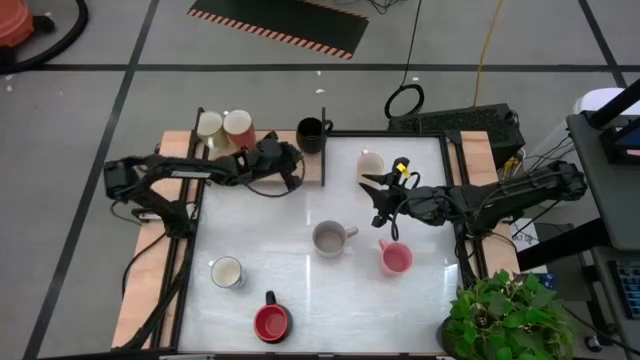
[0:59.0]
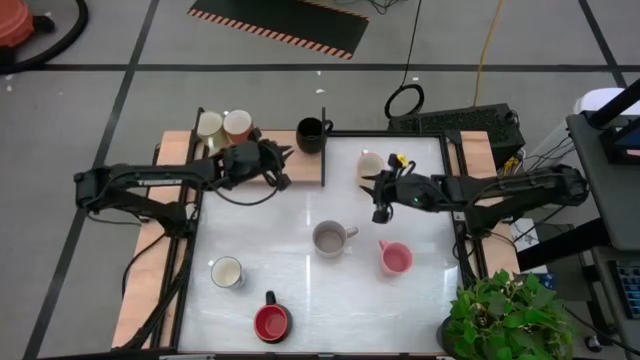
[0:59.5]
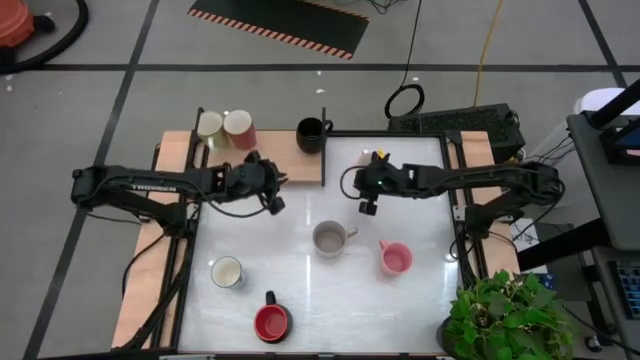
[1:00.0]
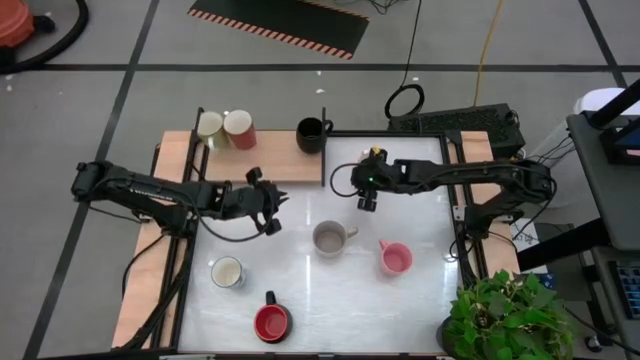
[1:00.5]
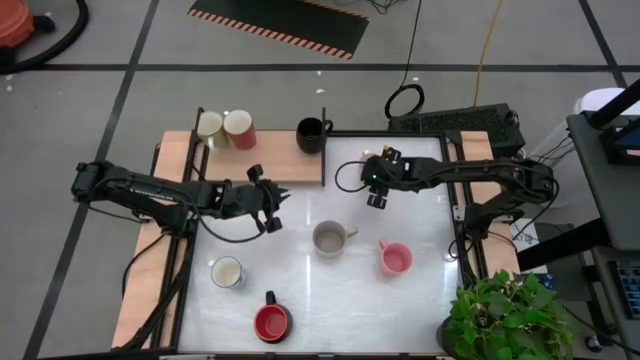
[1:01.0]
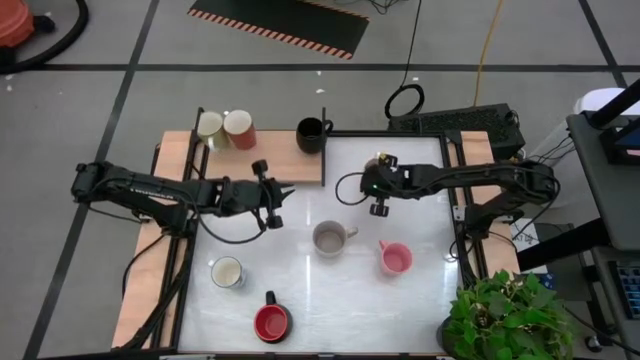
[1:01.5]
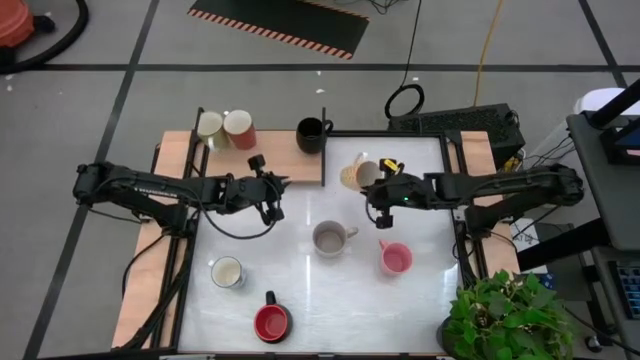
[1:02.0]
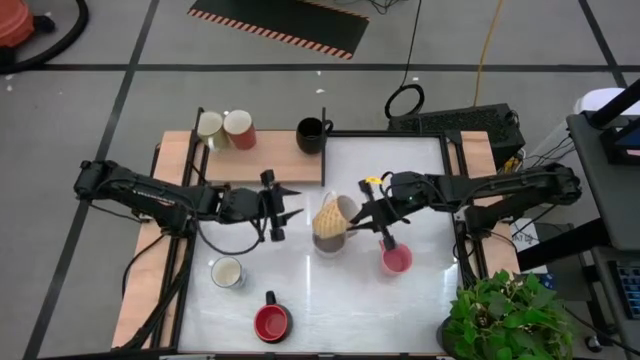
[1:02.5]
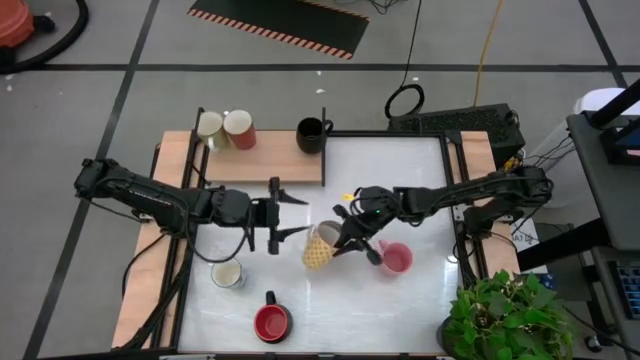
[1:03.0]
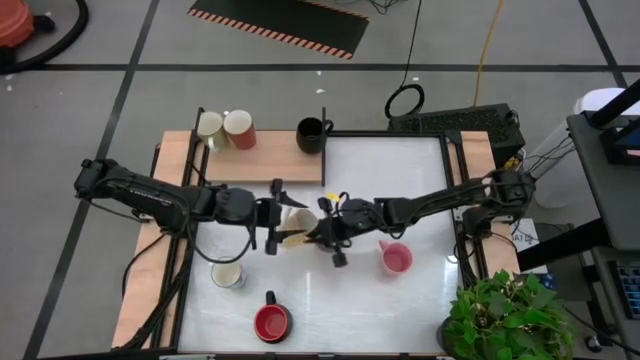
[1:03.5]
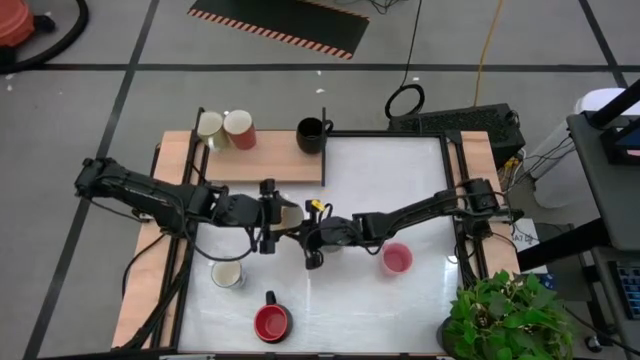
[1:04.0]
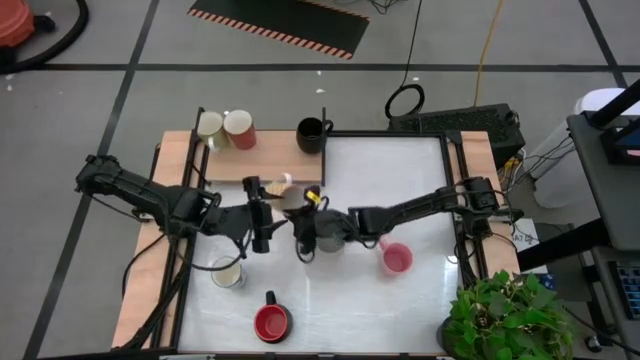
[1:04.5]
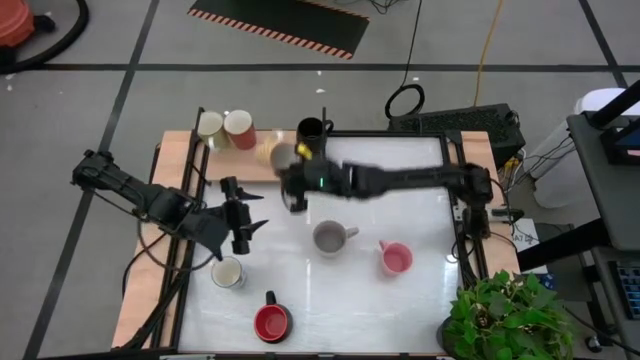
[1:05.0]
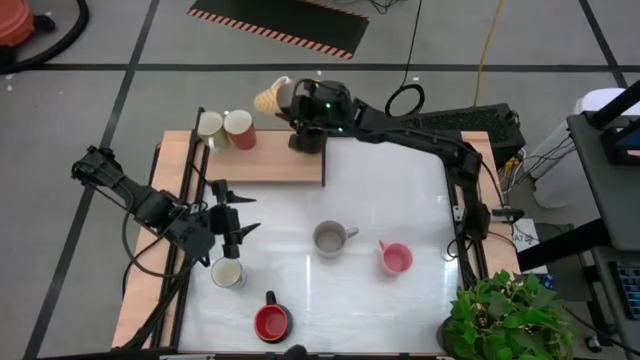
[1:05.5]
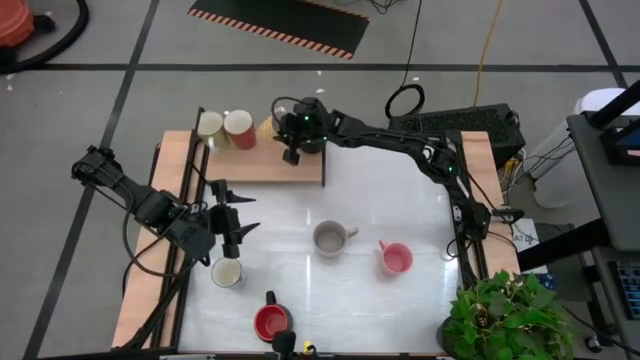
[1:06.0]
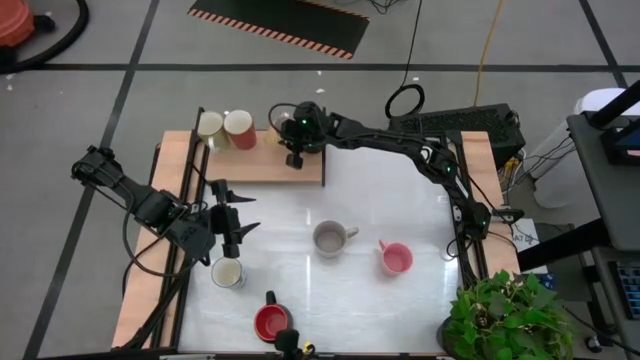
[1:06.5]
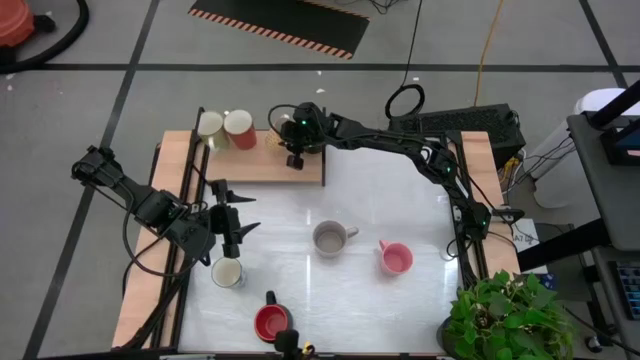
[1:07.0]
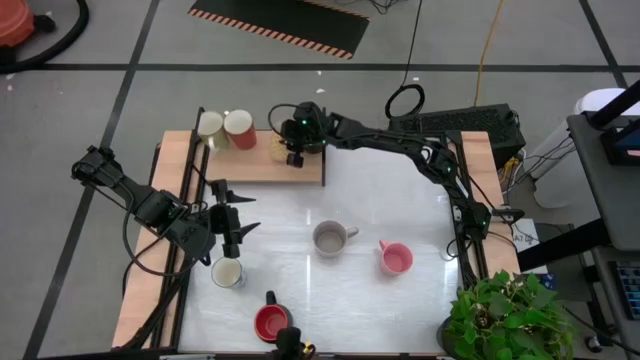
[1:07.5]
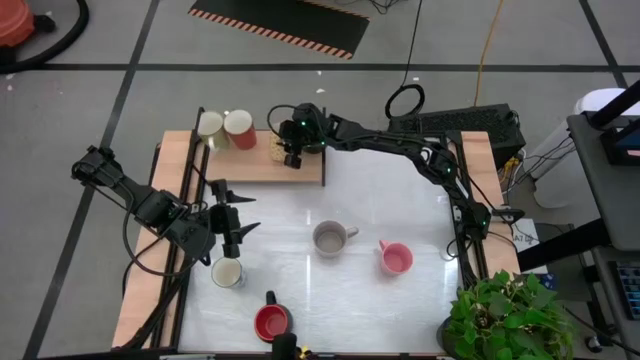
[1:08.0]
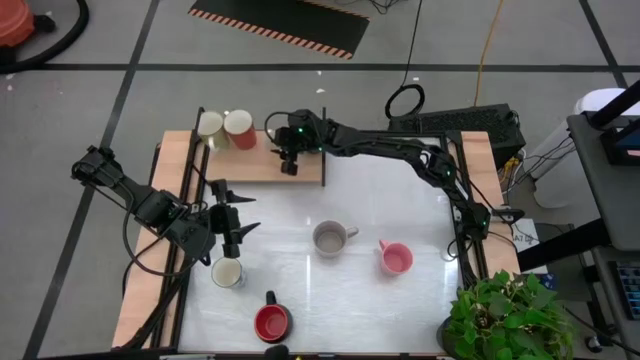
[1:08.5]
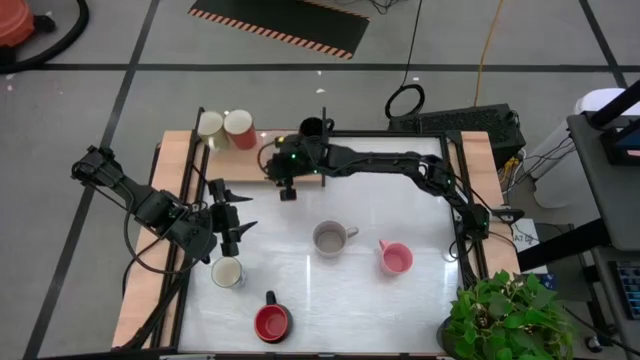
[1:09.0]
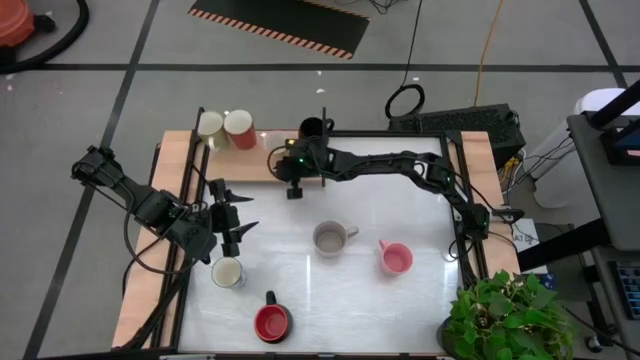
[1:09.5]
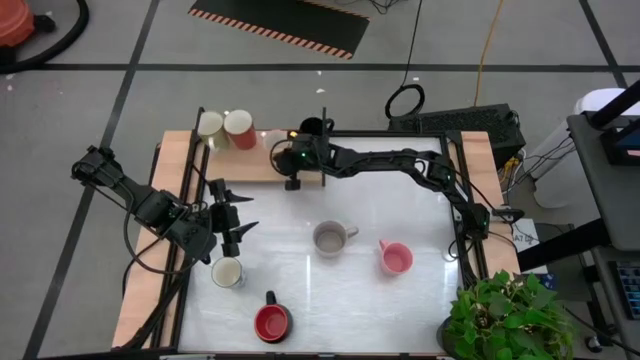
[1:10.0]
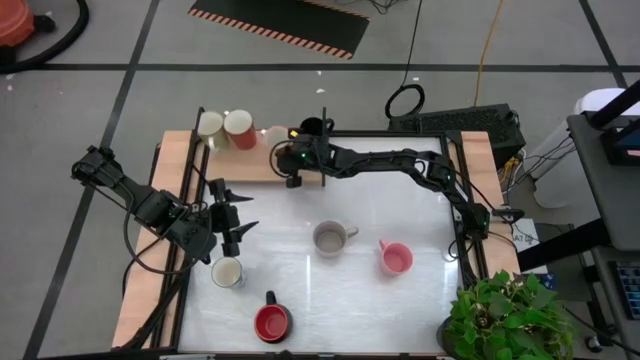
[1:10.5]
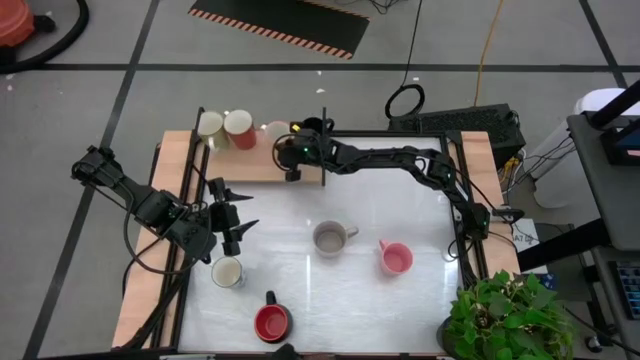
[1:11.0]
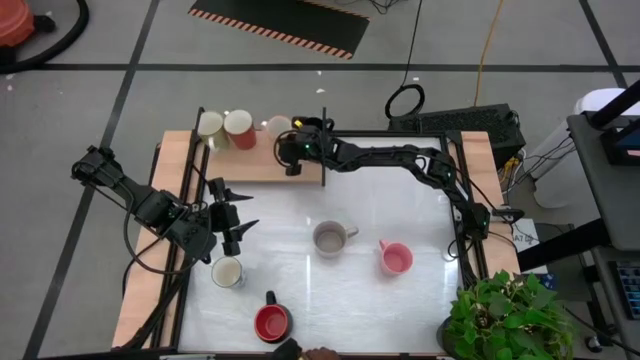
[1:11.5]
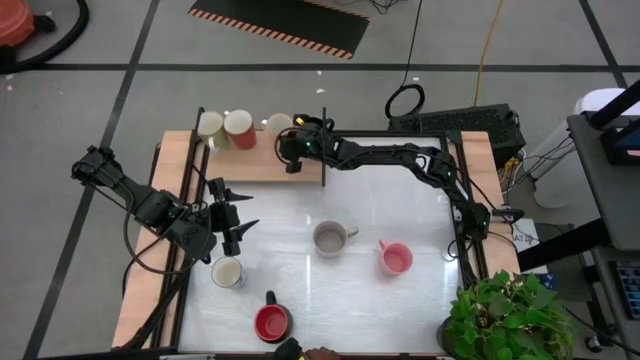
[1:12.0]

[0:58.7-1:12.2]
Task: Place coffee mugs
Put the yellow patterned mug on the shelf

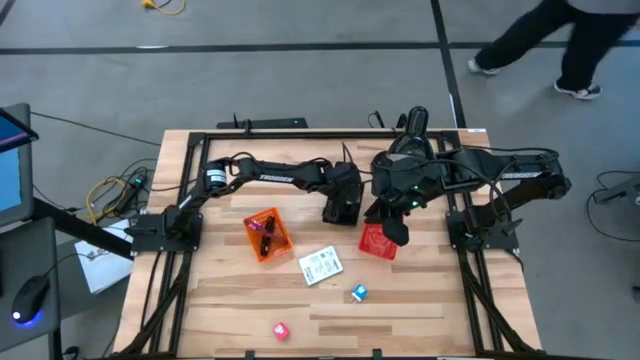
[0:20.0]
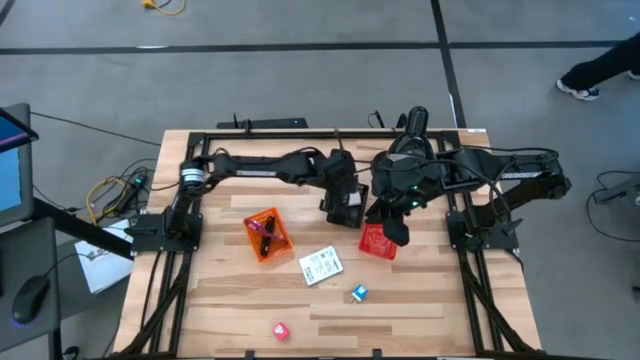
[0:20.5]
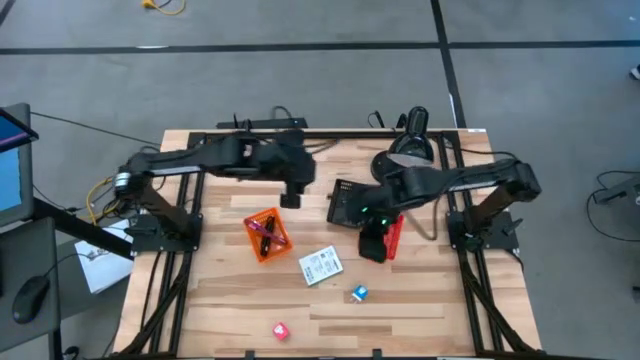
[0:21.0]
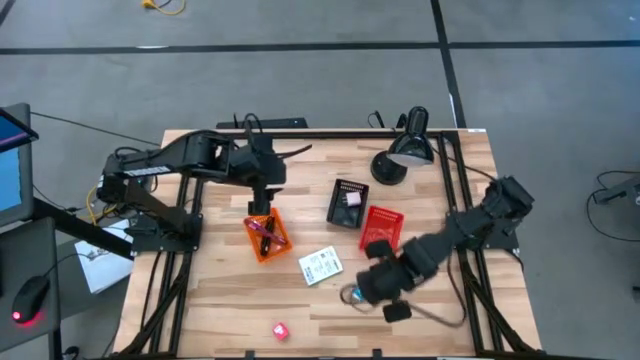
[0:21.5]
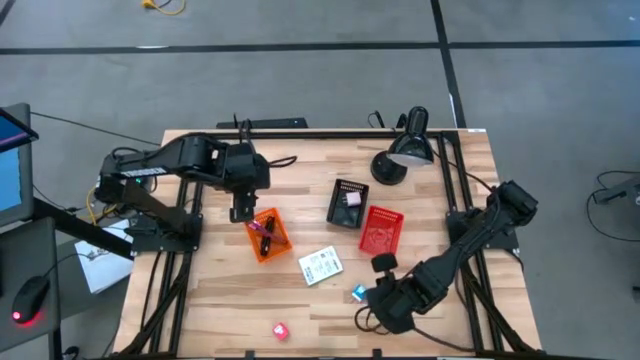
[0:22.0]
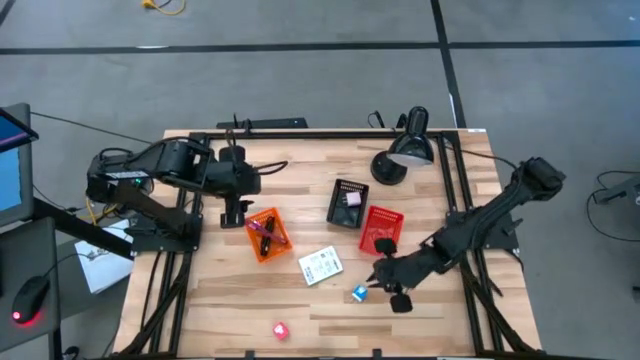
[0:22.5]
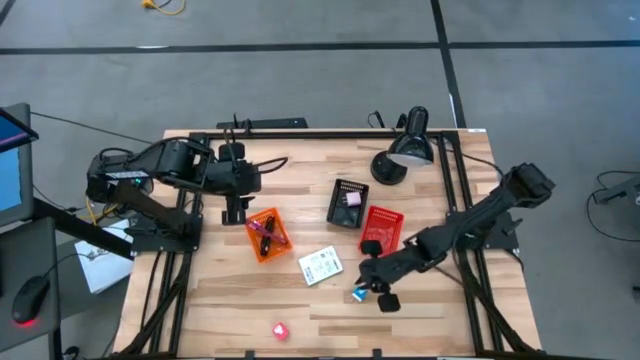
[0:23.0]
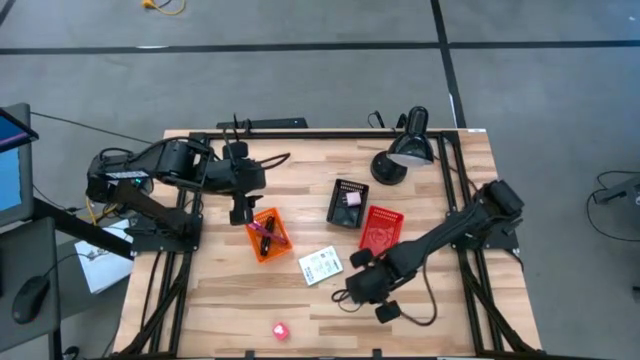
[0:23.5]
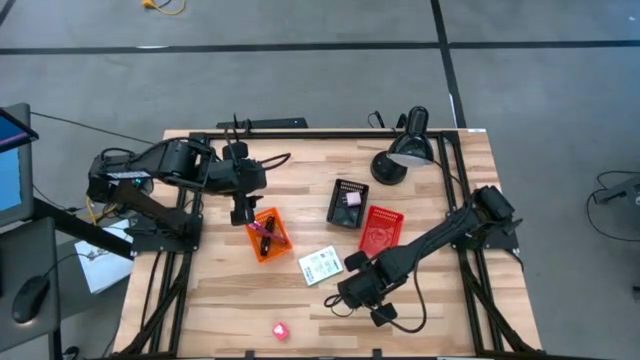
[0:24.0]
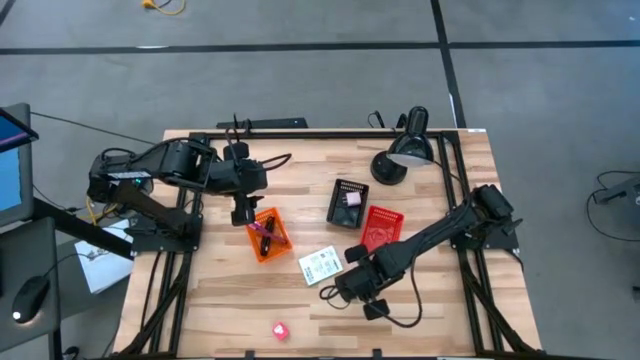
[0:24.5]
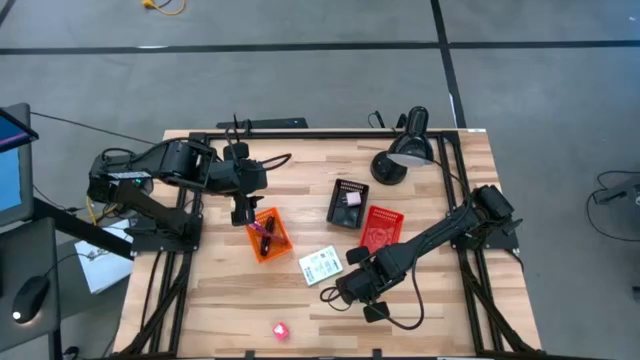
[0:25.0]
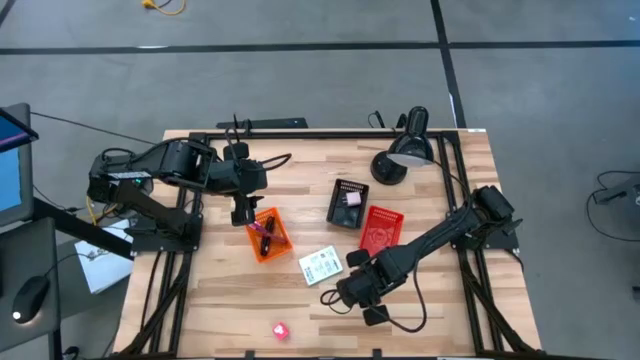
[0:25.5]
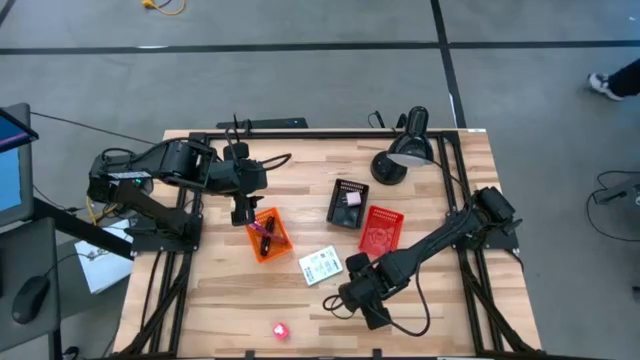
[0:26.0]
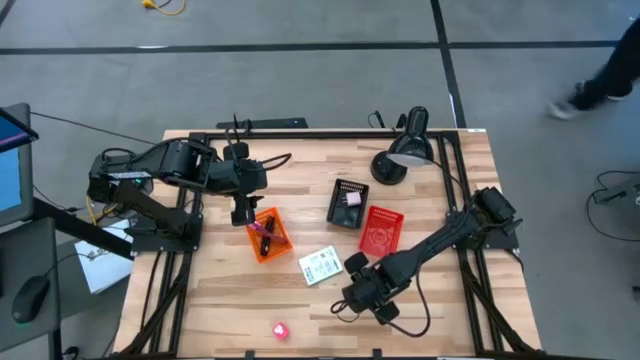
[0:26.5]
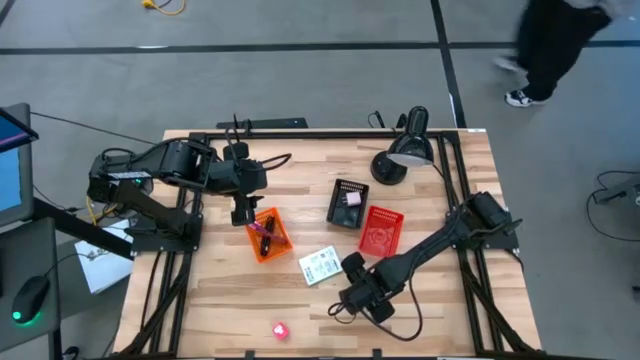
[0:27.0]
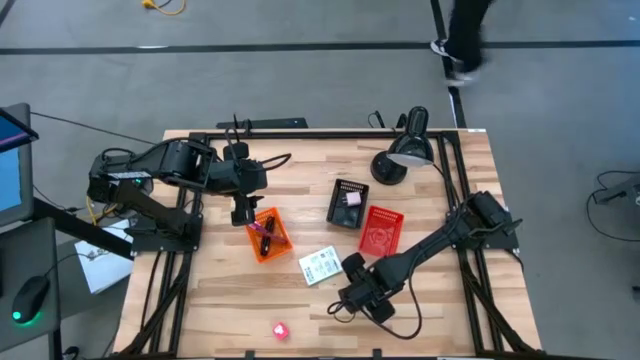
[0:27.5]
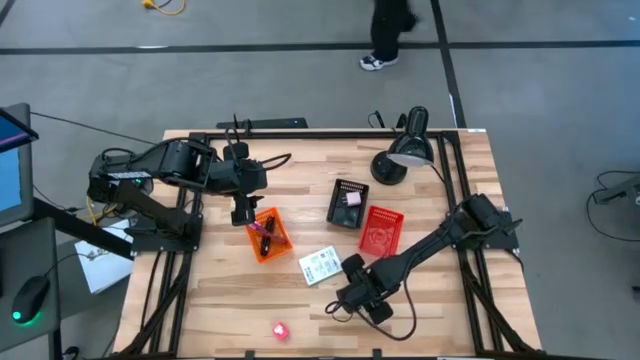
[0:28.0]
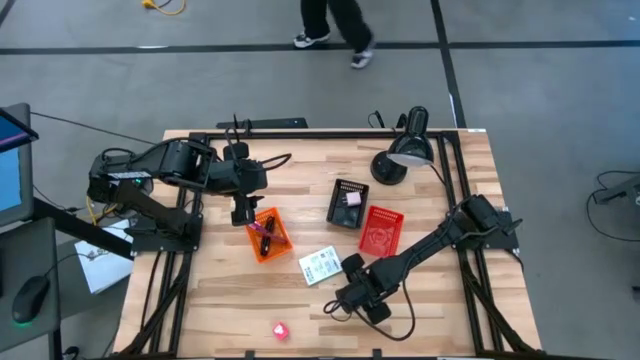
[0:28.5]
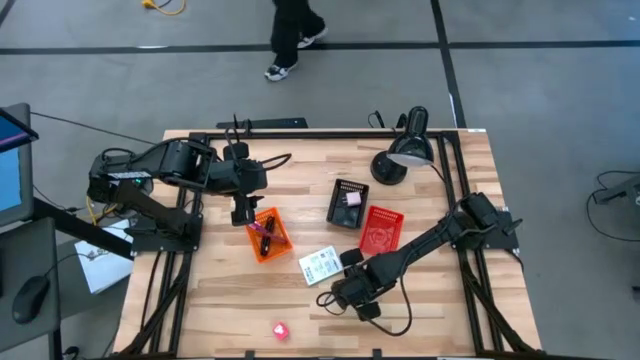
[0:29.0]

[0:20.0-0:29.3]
Task: Pick and place items into bin
Put the blue charger adapter into the black bin
